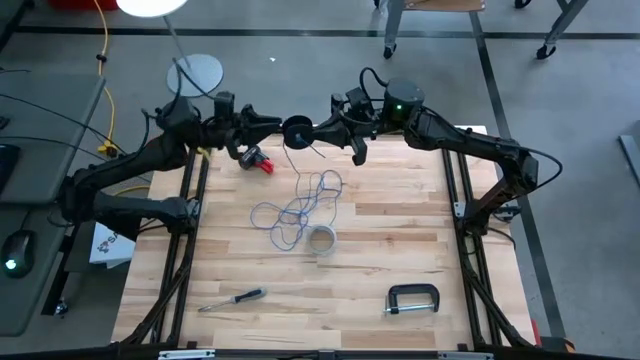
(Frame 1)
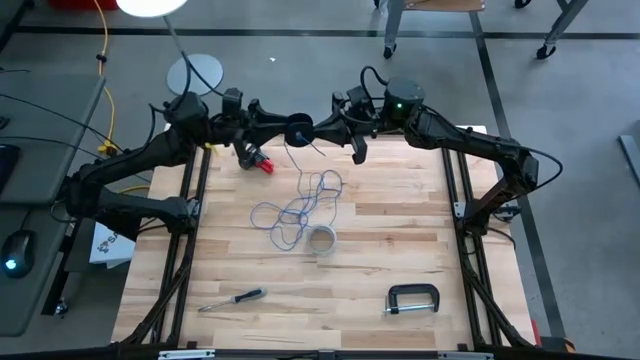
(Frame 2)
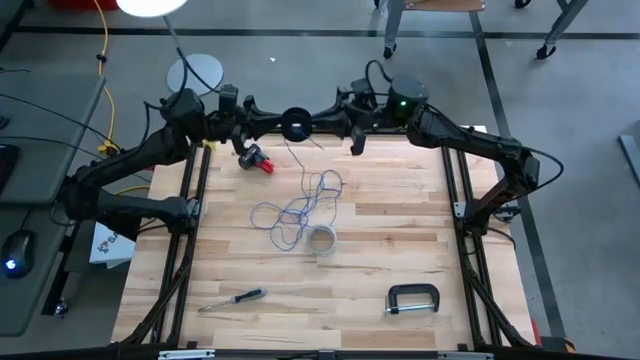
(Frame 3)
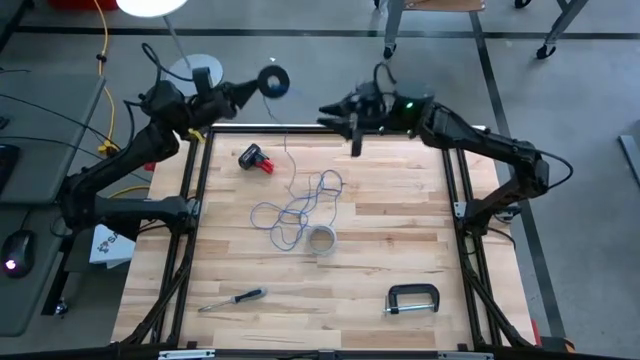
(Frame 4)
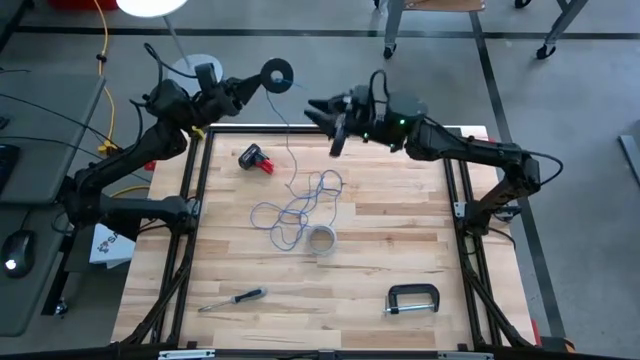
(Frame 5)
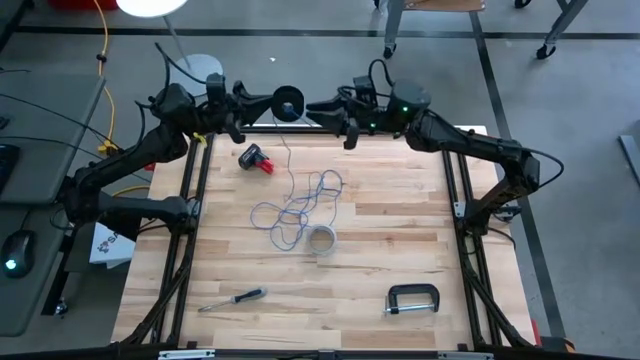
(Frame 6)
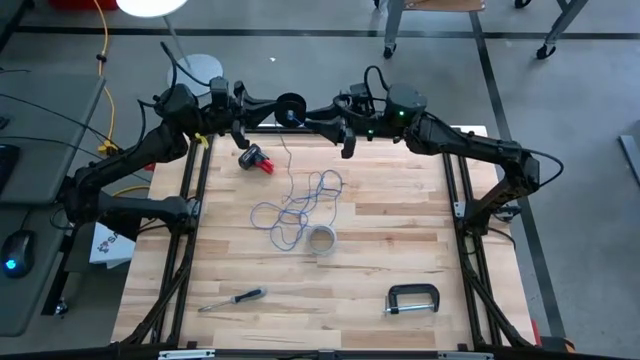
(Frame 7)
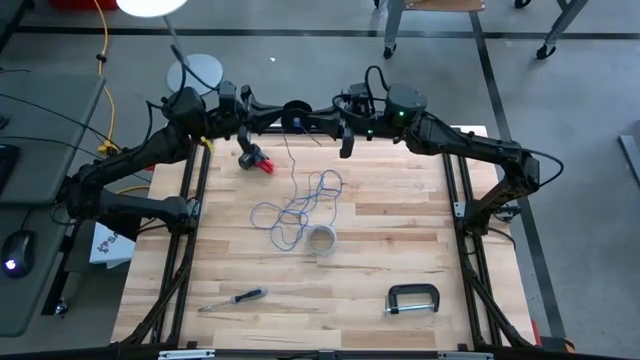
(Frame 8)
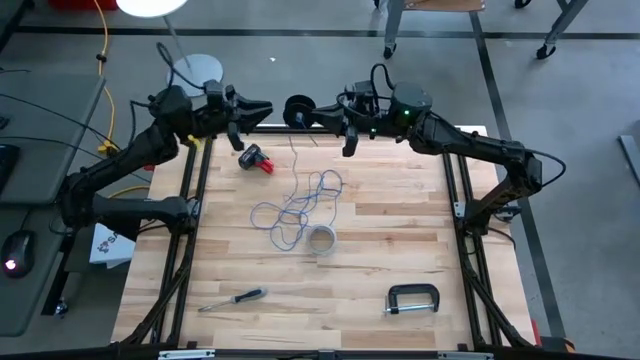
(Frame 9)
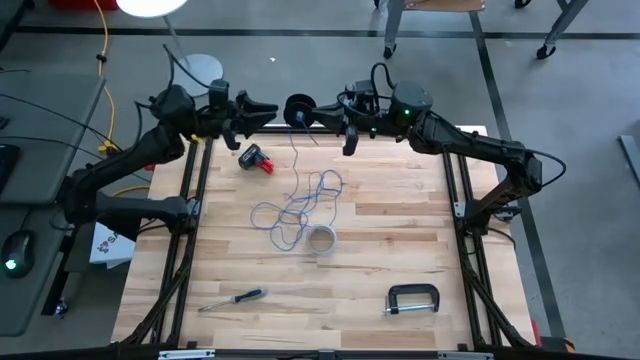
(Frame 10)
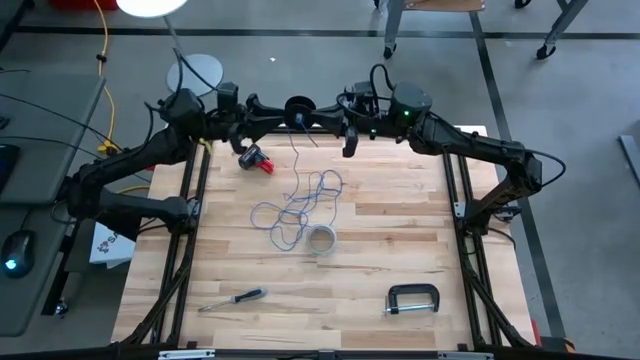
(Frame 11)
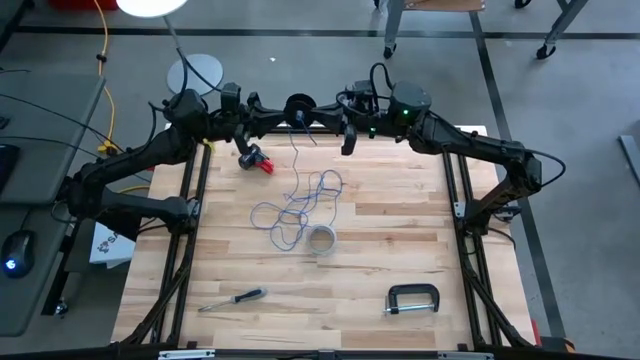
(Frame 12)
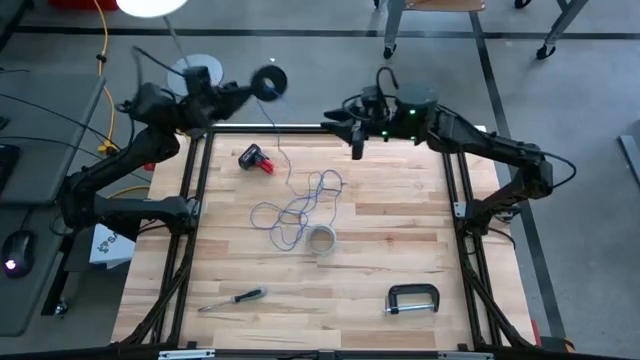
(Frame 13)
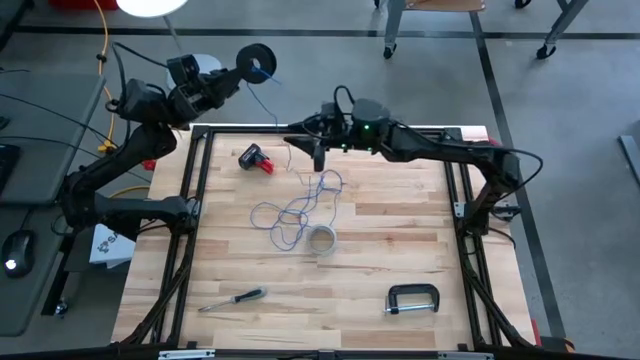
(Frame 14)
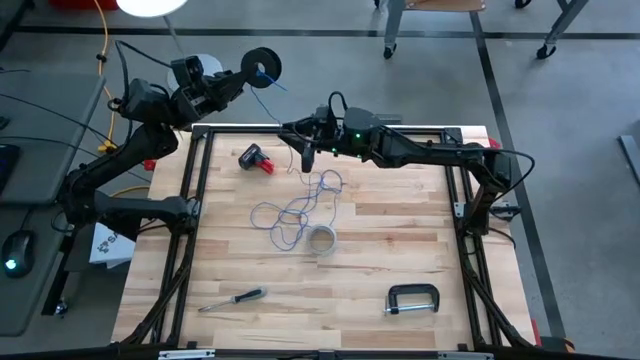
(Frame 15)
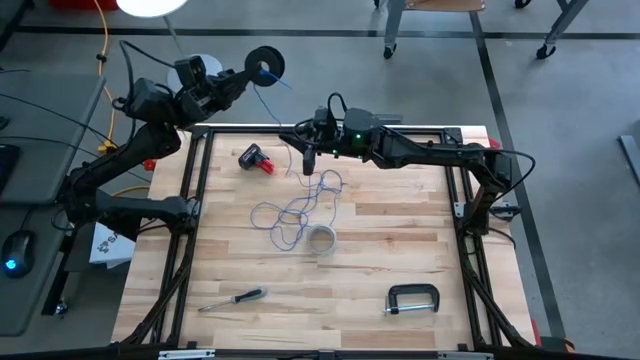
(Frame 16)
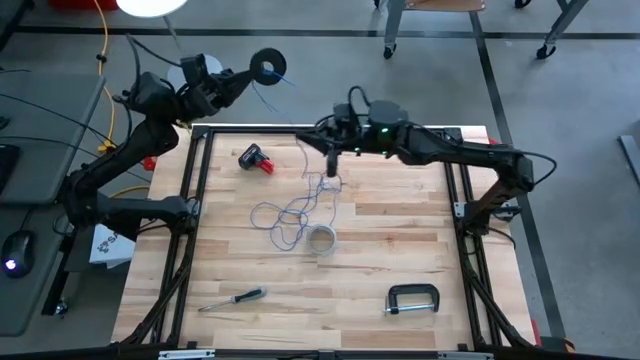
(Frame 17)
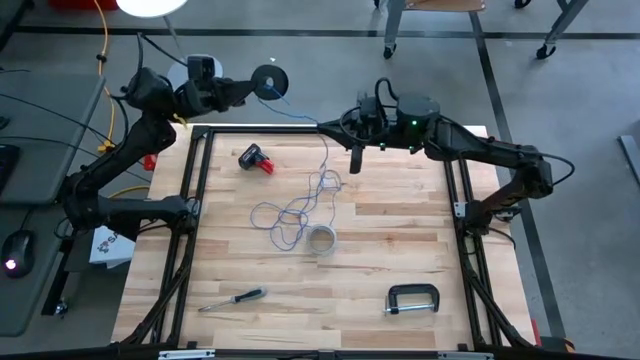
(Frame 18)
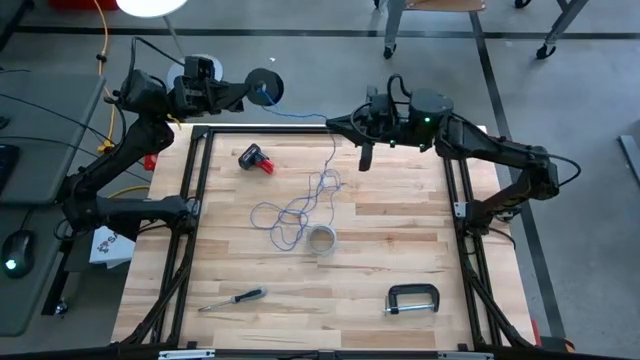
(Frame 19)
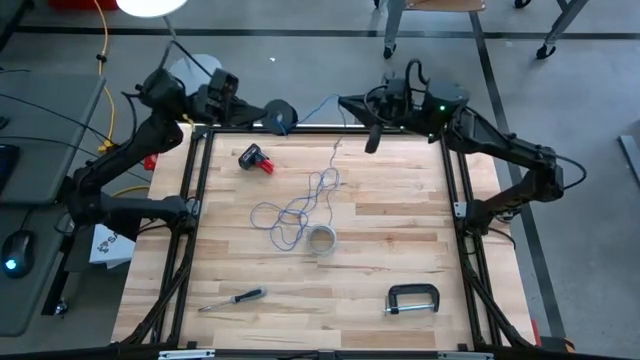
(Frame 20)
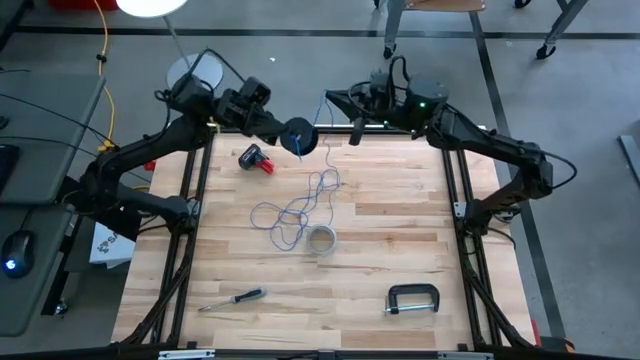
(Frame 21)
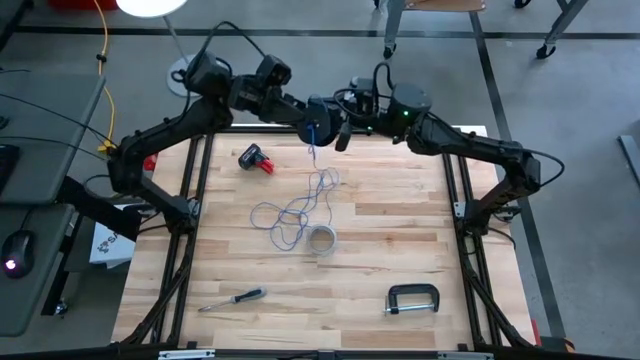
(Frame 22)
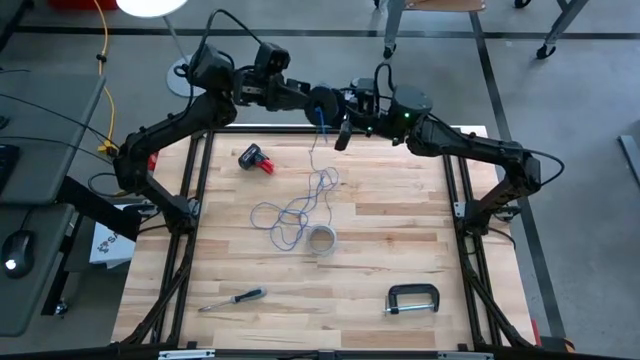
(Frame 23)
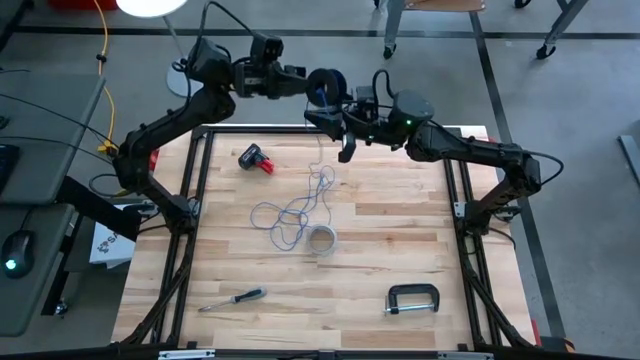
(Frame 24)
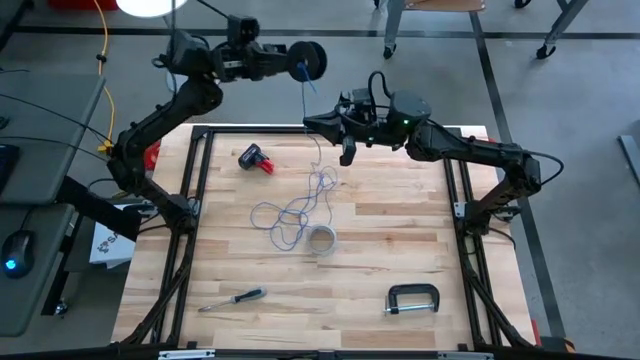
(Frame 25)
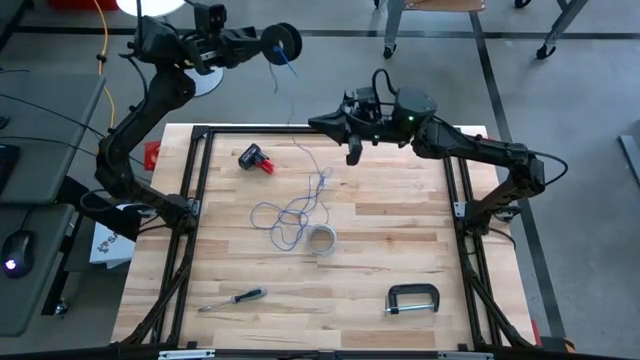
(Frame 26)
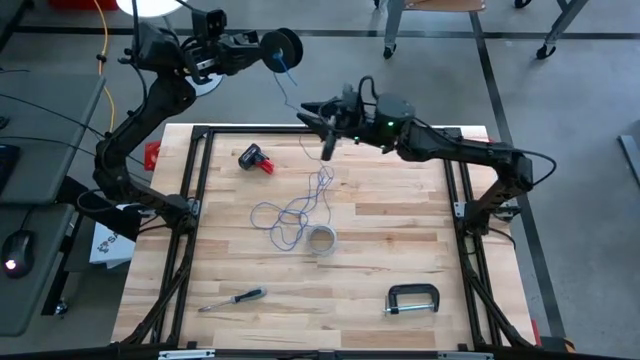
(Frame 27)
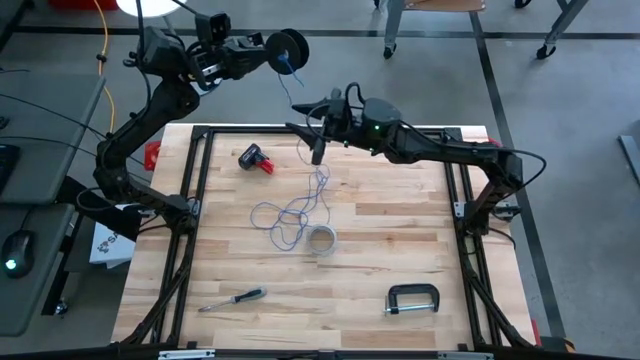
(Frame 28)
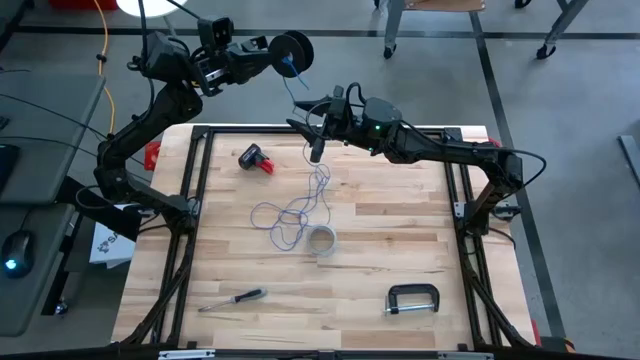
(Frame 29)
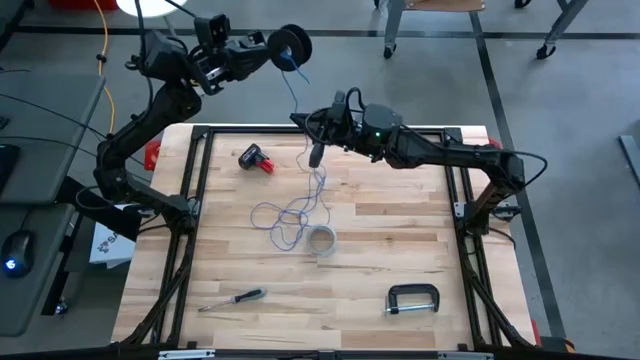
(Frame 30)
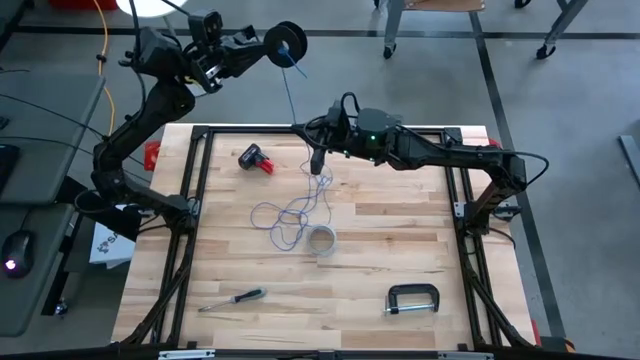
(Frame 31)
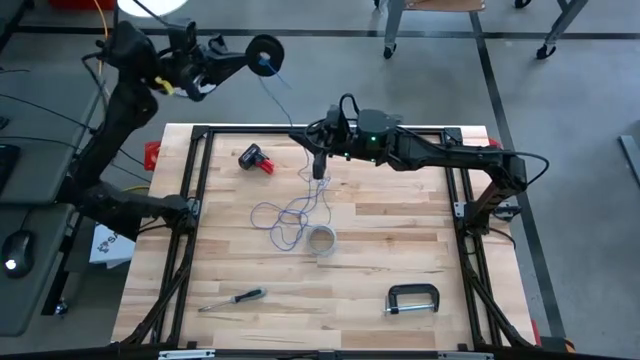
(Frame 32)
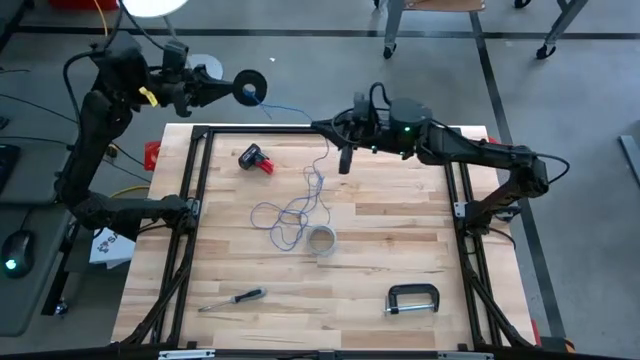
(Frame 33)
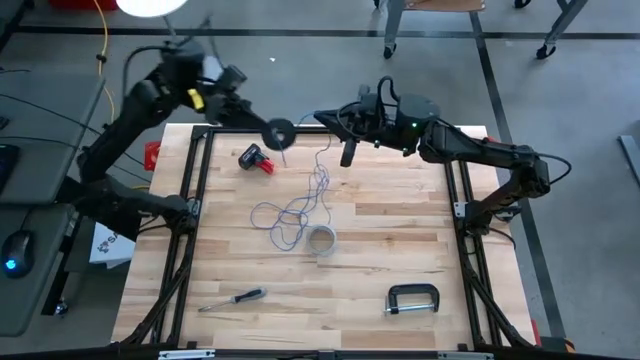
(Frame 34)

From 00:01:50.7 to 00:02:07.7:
Task: Coil cords
Coil the blue wire on the spool

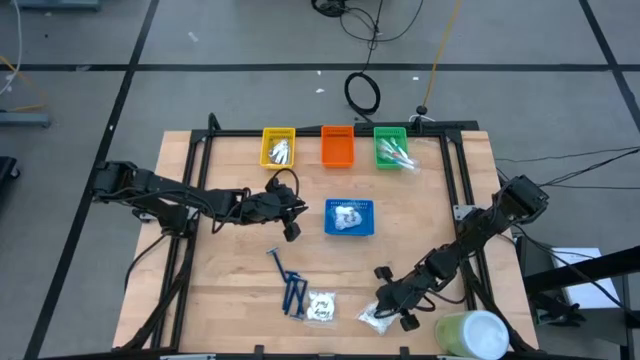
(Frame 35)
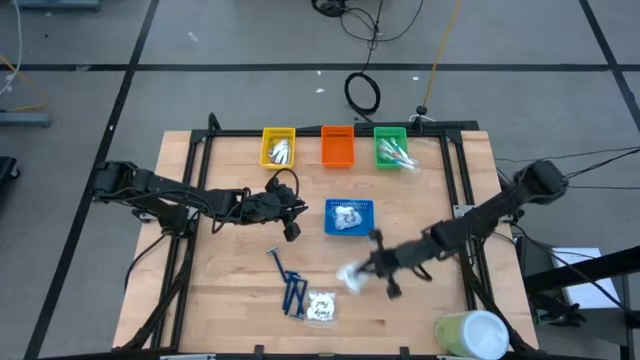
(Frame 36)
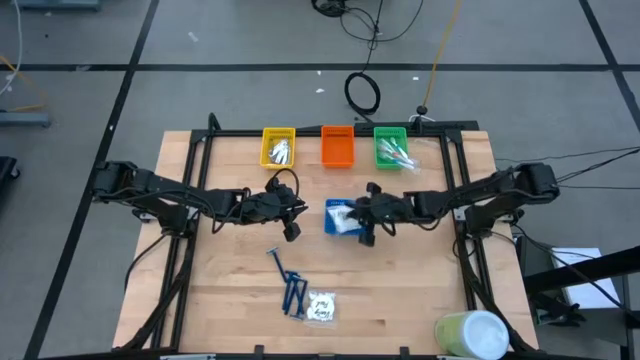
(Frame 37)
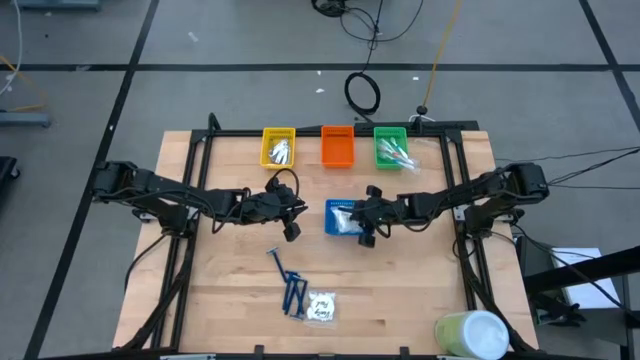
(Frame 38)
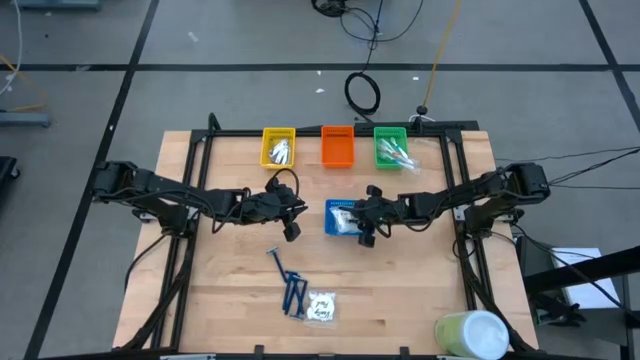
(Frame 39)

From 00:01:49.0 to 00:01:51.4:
Task: Pick & Place Travel size toiletries
Put the white cotton pack into the blue basket
